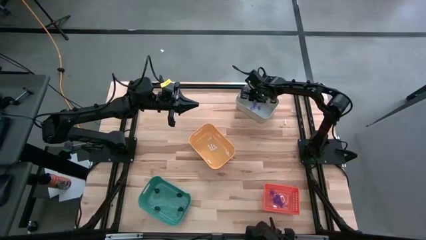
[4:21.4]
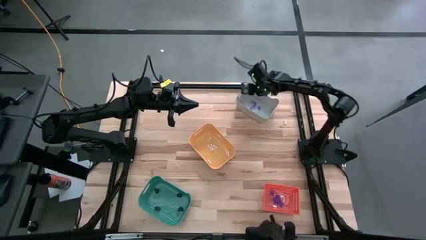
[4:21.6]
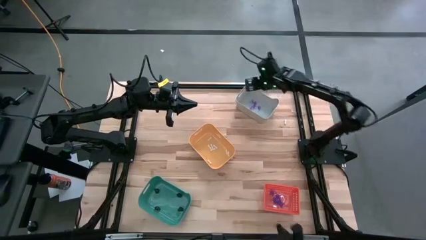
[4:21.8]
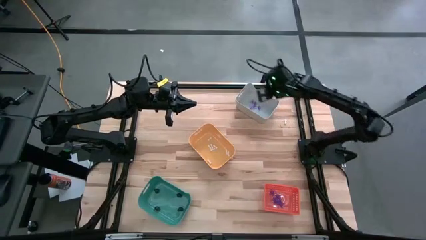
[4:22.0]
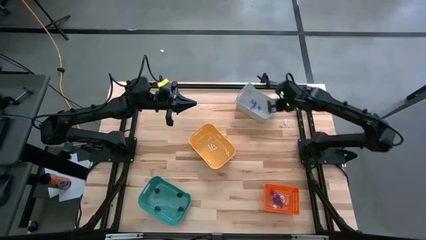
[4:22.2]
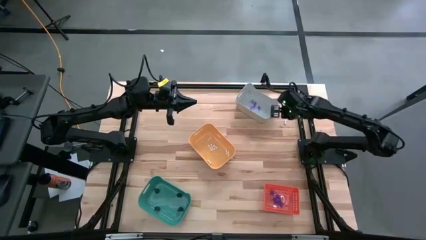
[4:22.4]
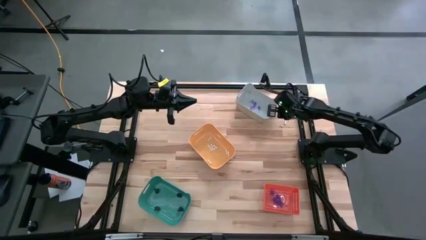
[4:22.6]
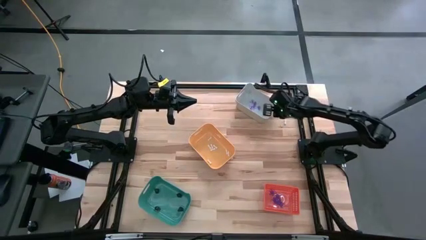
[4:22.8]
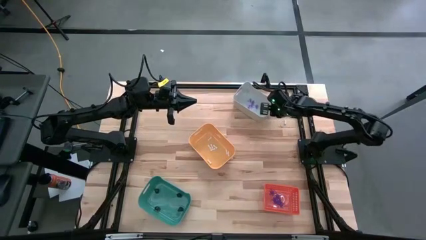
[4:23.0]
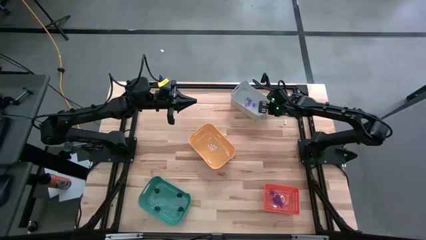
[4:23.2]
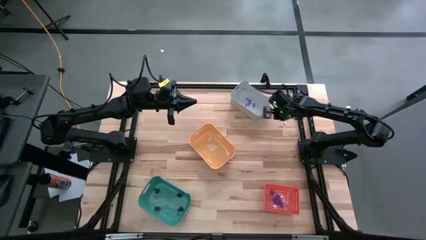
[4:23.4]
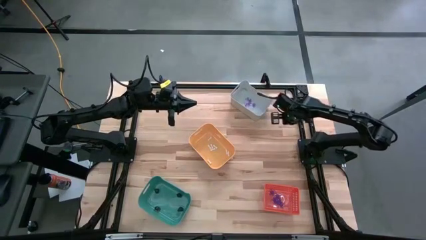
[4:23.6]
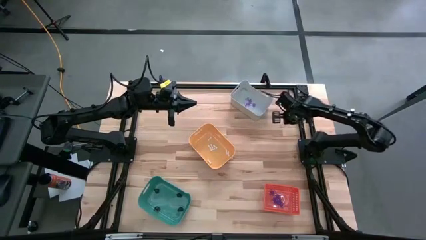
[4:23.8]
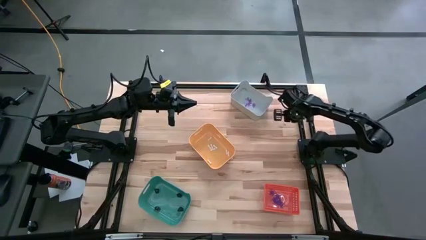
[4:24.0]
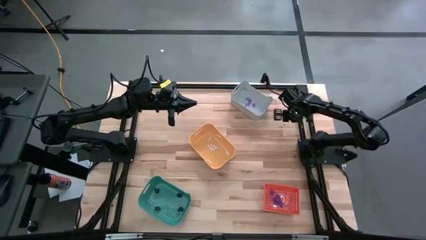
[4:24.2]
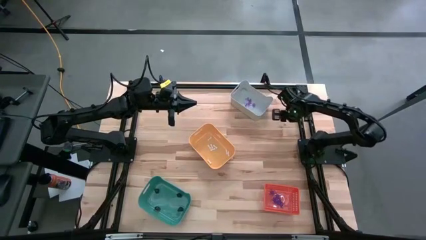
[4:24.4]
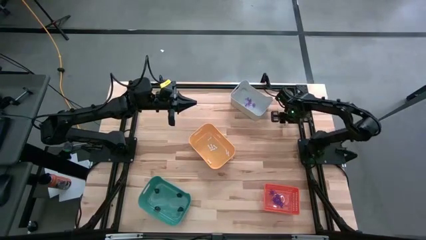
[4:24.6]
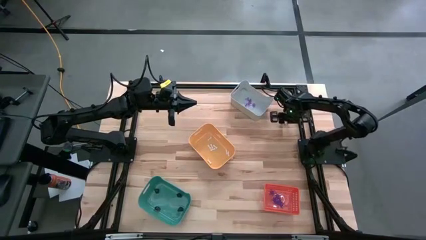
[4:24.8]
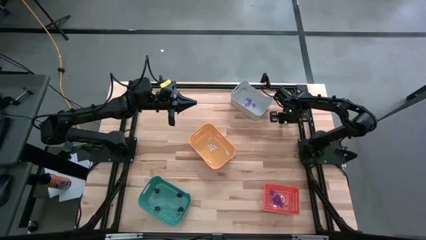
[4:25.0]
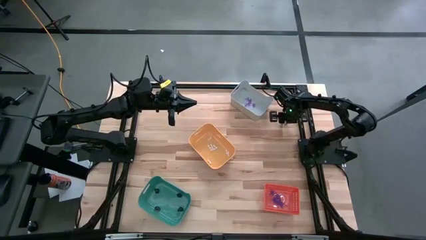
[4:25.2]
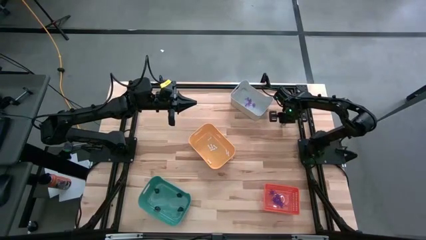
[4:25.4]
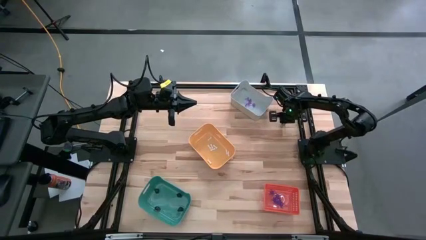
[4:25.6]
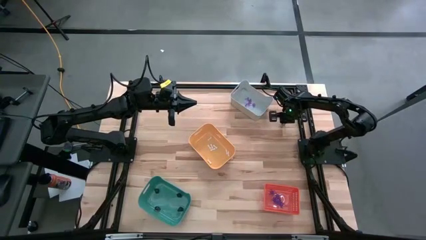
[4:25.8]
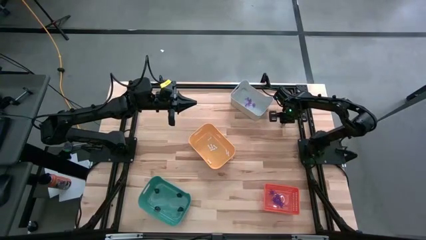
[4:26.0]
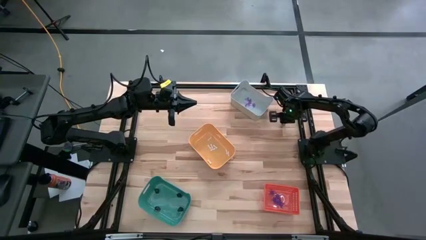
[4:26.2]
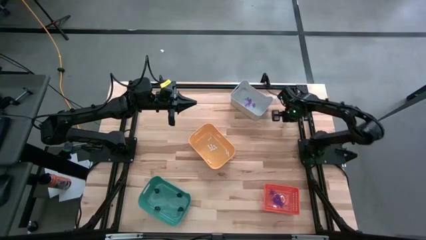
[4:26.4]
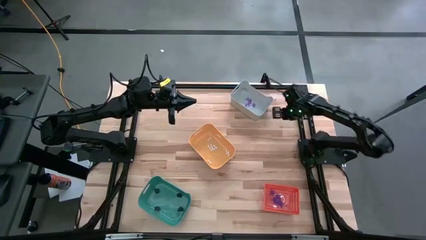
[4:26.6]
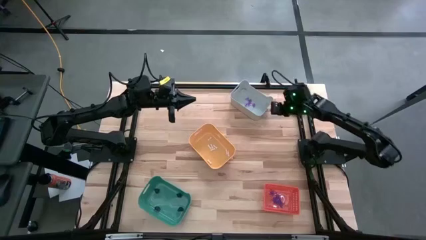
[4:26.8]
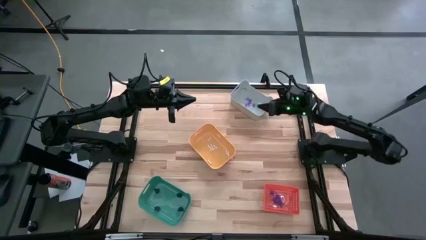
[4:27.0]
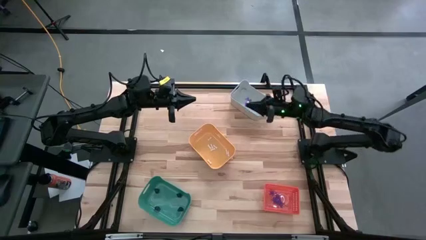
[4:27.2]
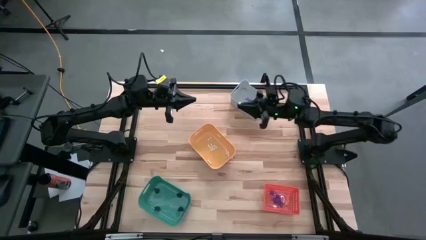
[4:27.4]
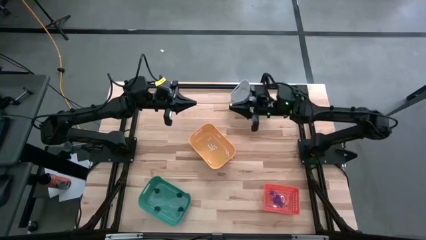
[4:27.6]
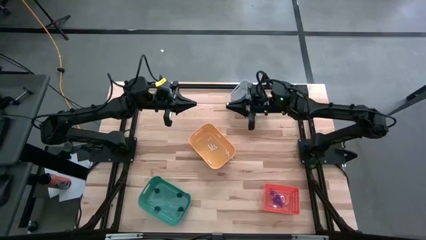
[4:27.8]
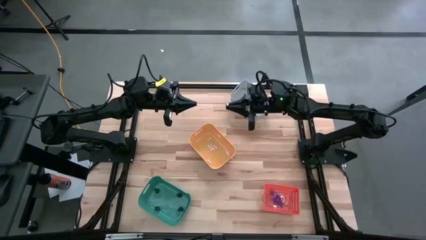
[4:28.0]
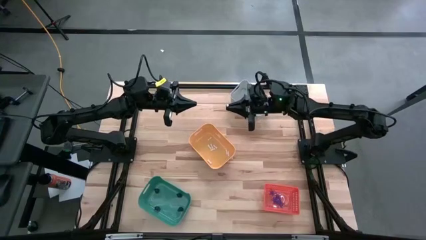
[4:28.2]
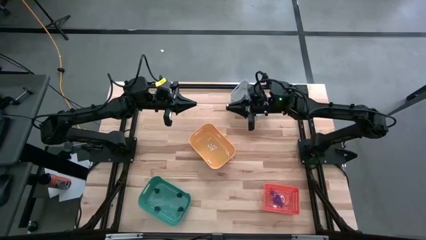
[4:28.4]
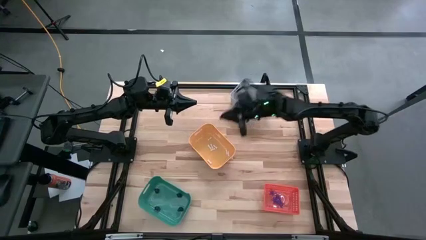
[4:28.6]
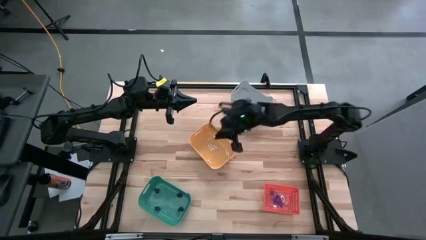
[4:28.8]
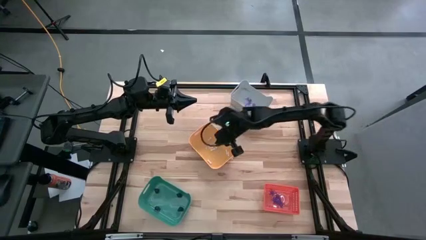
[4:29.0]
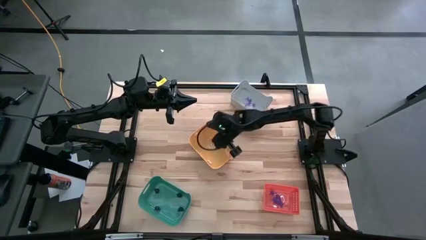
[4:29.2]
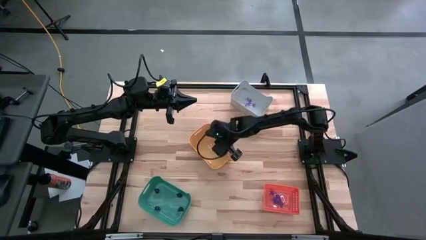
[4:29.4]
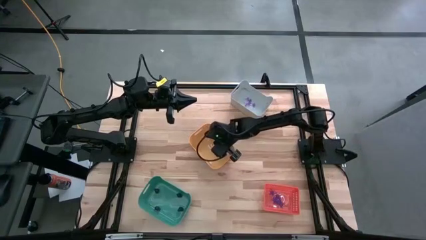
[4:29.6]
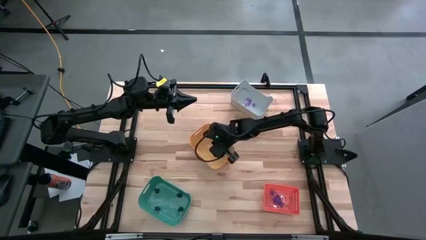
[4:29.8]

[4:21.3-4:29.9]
Task: Sort Halloween decoration
Put the white bone toy into the yellow bin

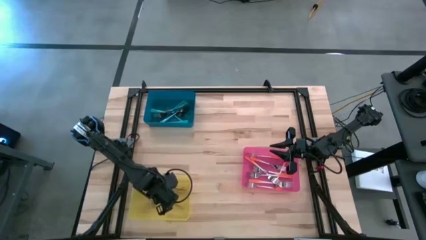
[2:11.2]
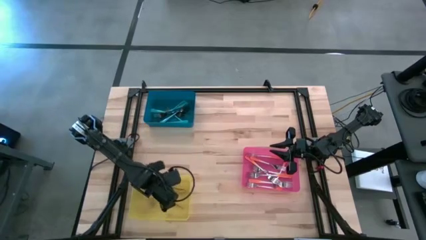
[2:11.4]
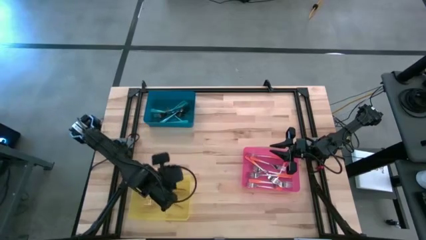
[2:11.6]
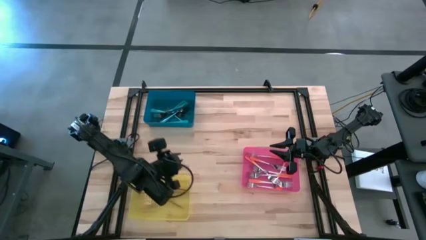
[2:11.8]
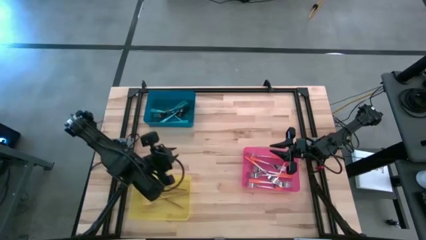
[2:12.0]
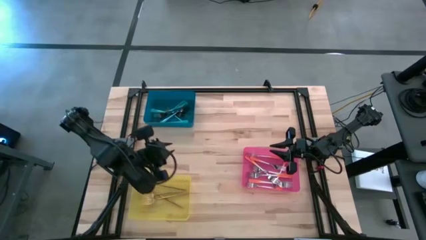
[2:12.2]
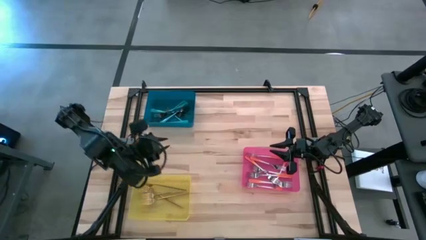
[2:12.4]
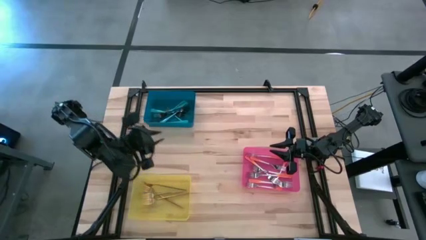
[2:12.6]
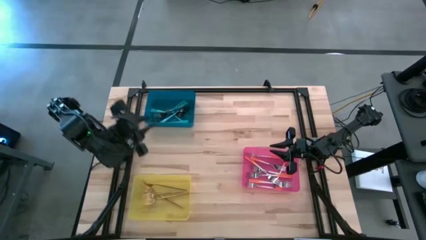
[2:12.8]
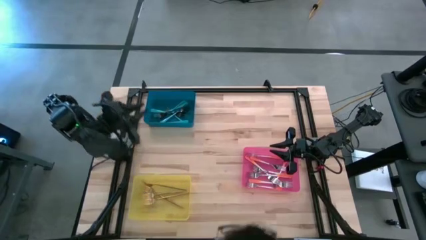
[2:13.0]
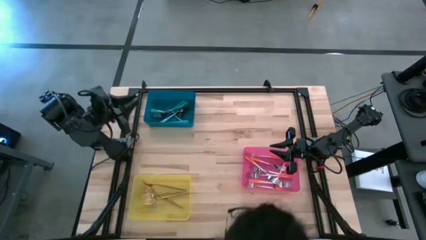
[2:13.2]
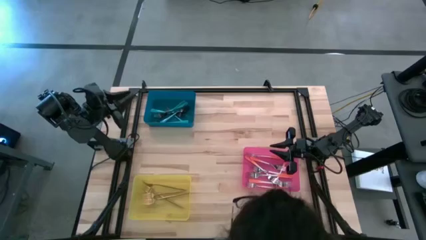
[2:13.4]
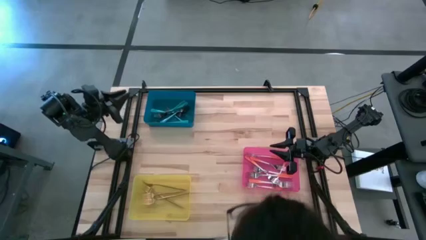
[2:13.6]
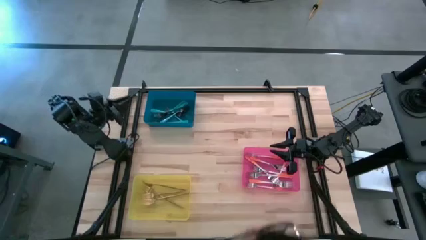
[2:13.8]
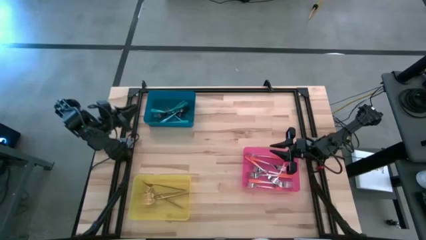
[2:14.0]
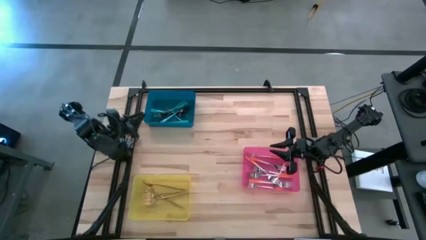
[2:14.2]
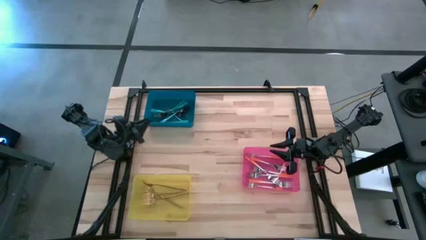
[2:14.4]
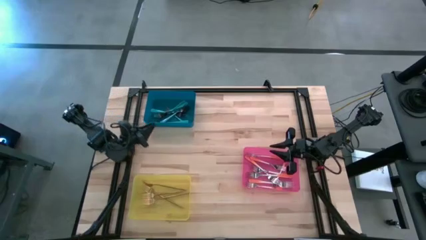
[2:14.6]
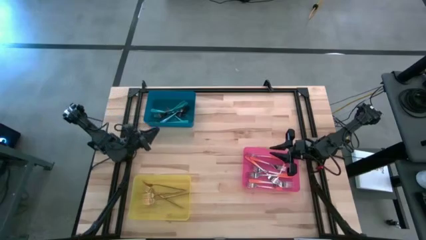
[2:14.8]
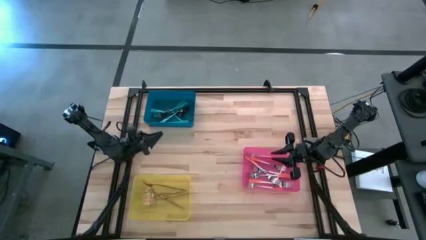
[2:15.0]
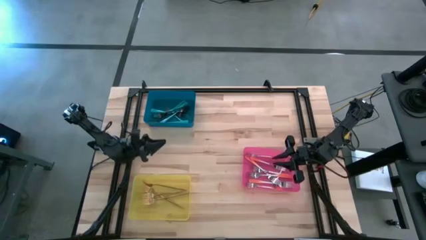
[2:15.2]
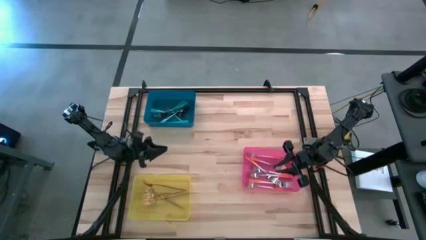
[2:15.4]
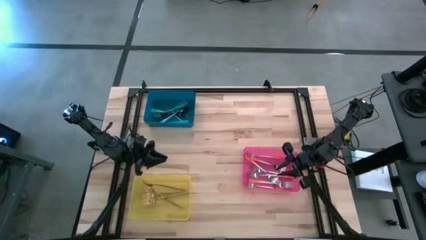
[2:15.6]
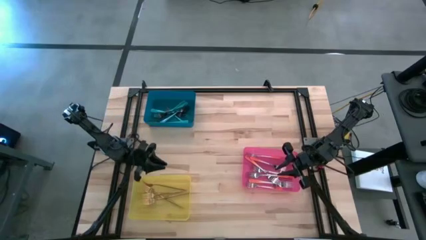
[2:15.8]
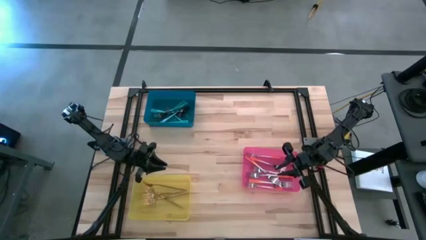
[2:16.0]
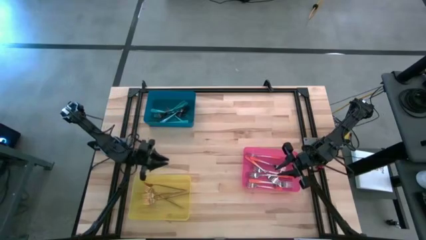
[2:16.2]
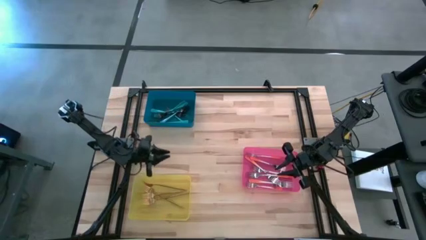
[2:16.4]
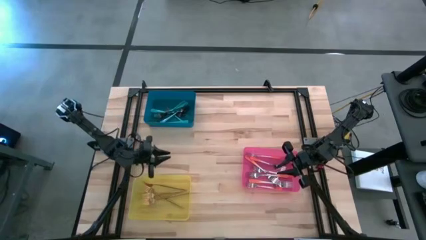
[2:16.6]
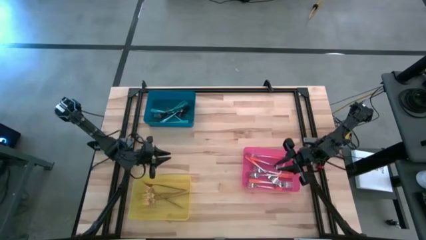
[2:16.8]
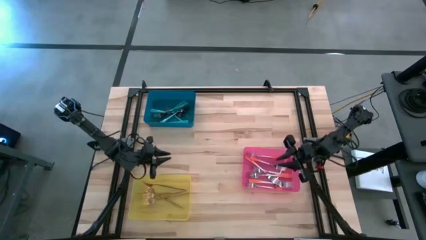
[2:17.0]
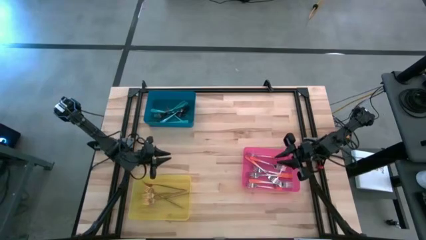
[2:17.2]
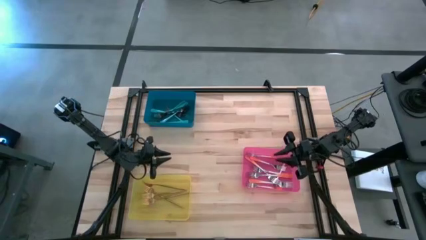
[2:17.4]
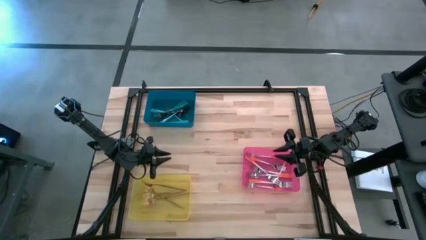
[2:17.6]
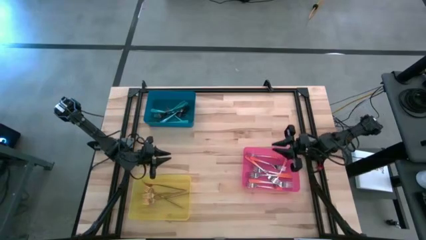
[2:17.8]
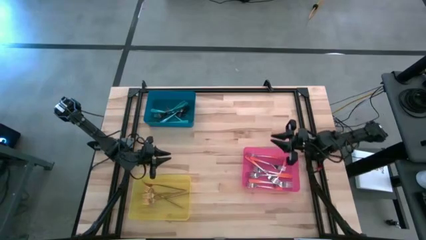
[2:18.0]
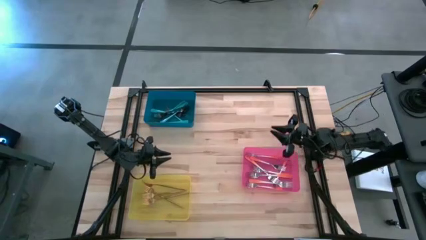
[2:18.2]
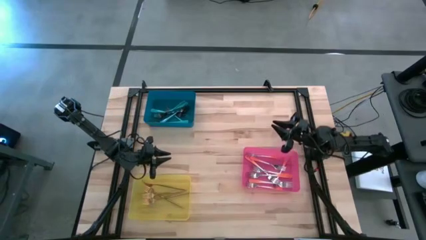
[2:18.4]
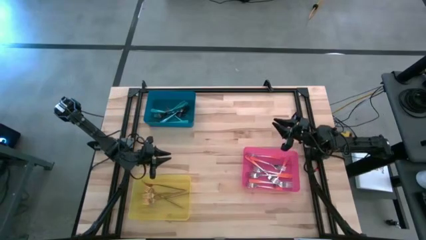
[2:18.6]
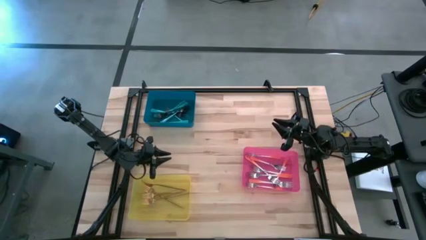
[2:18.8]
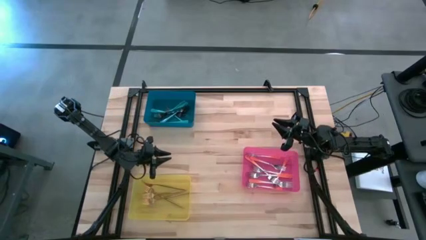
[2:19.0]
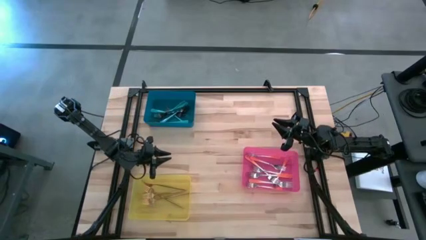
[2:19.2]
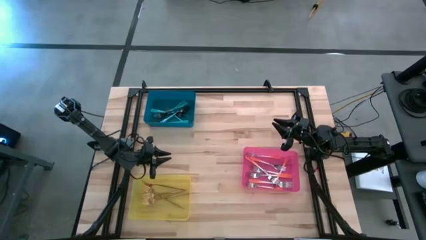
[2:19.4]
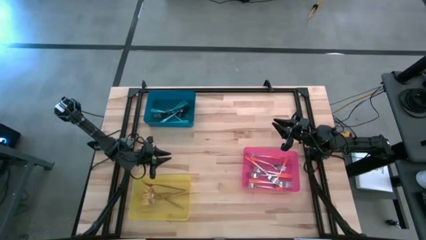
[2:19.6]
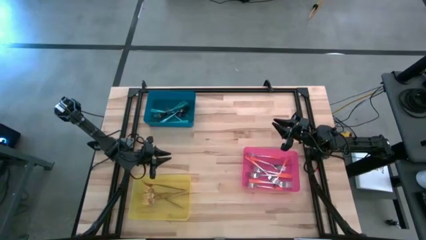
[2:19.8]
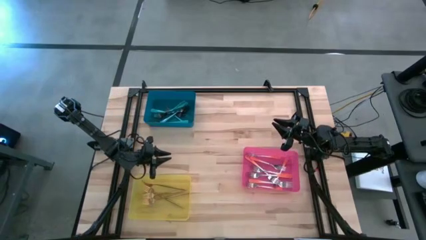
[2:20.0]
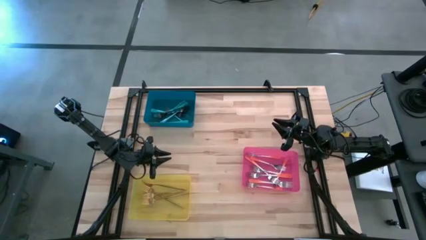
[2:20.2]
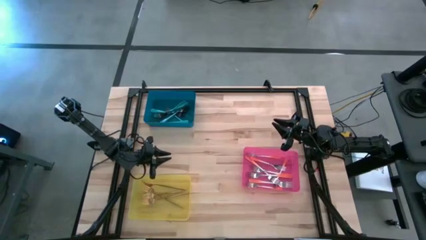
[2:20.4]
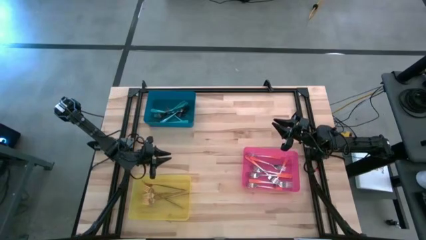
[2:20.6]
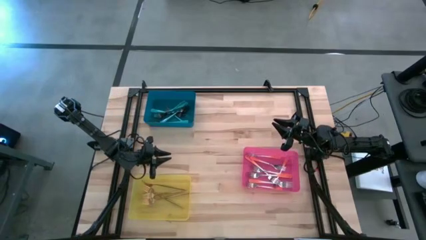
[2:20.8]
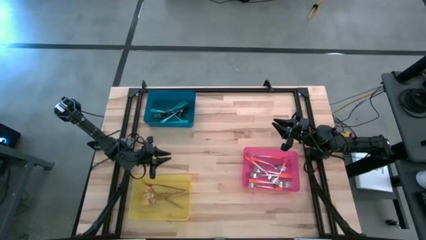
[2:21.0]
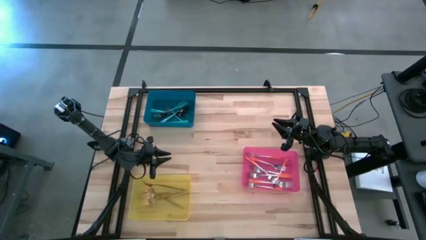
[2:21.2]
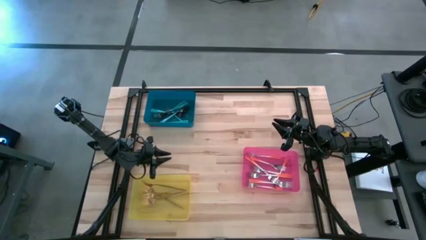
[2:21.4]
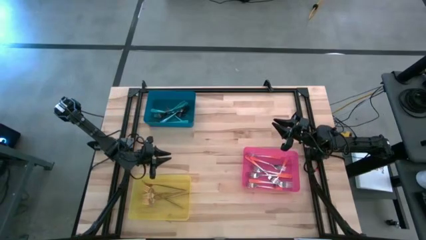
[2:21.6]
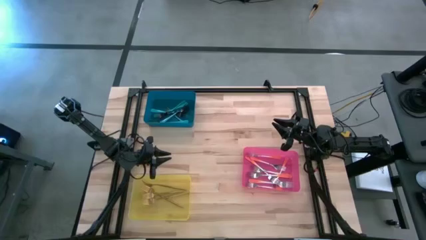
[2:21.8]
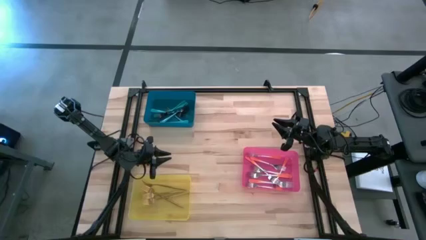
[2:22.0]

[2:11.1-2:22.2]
Task: Sort silverware by color (type)
Return to Home Position
